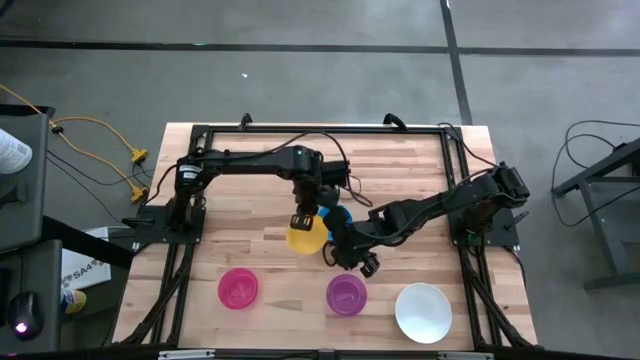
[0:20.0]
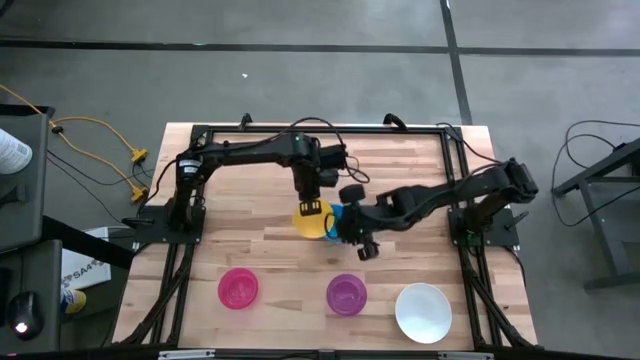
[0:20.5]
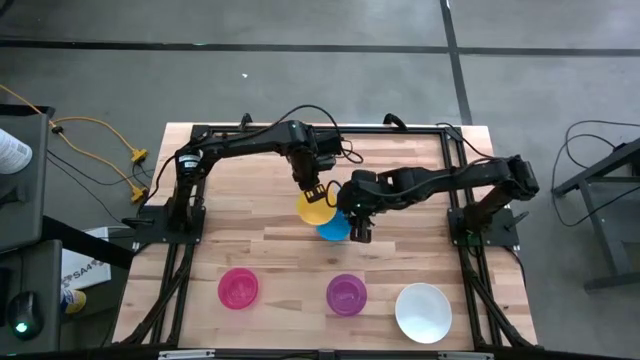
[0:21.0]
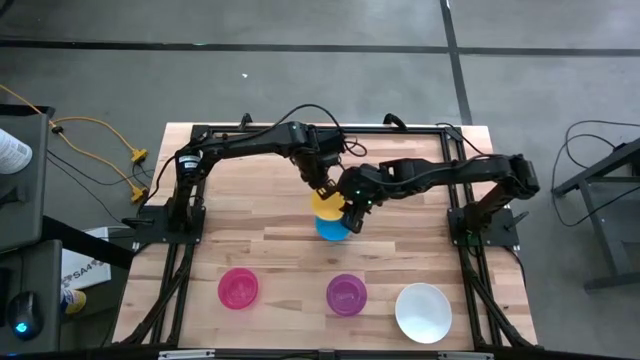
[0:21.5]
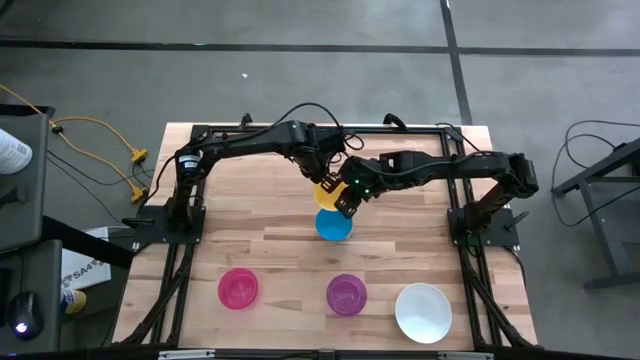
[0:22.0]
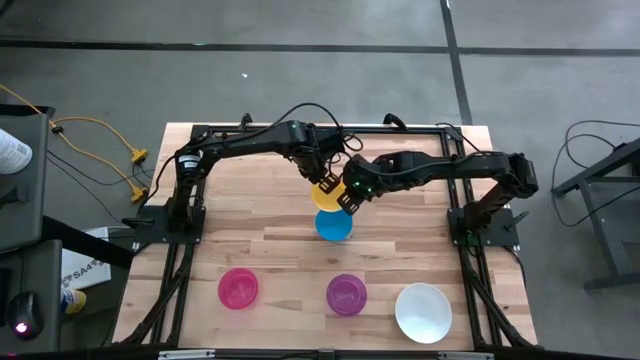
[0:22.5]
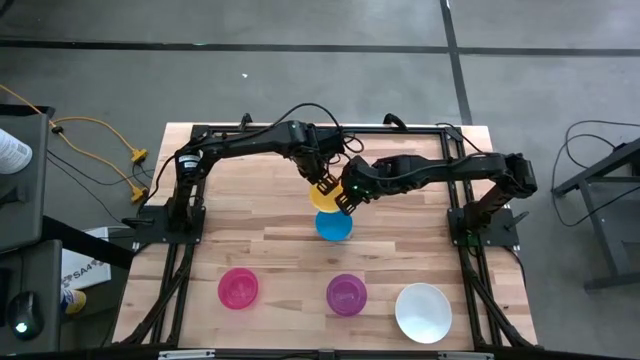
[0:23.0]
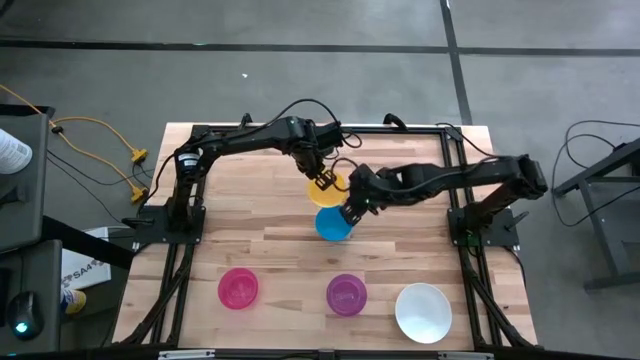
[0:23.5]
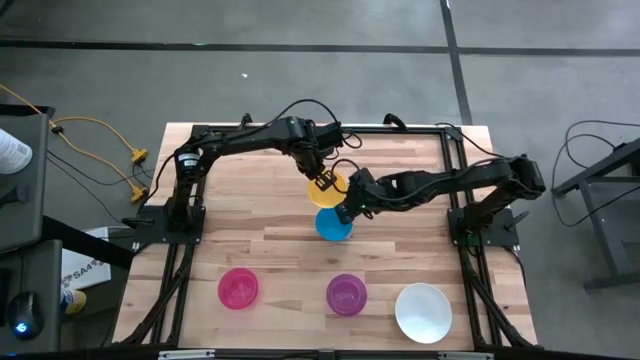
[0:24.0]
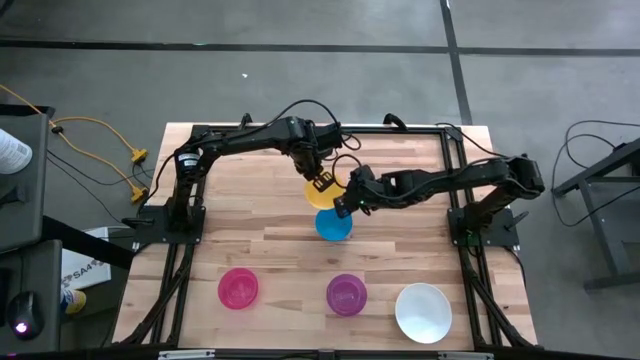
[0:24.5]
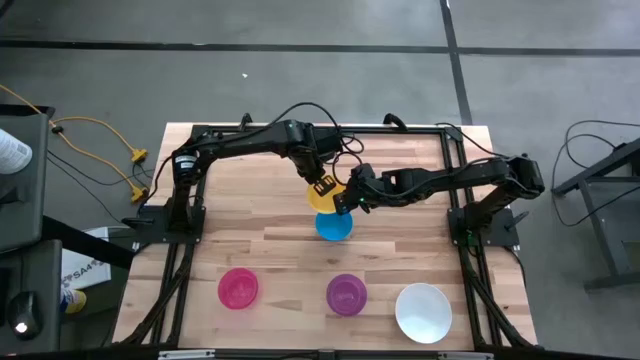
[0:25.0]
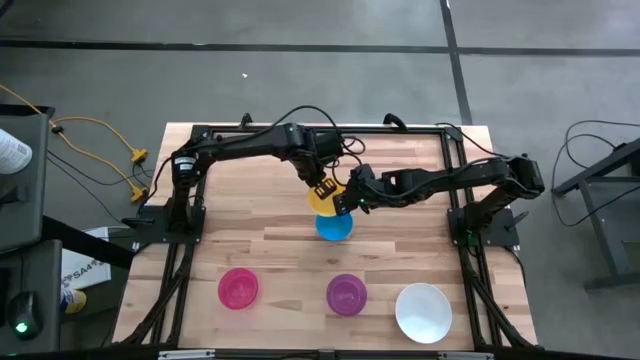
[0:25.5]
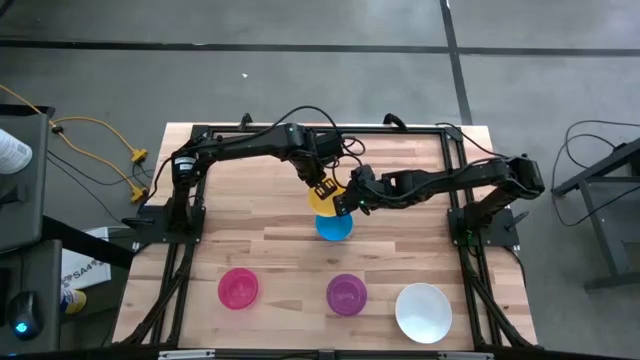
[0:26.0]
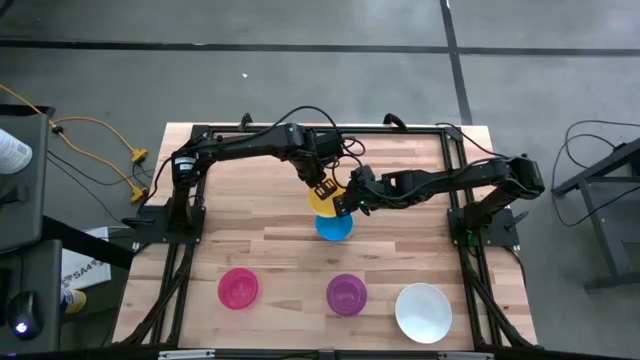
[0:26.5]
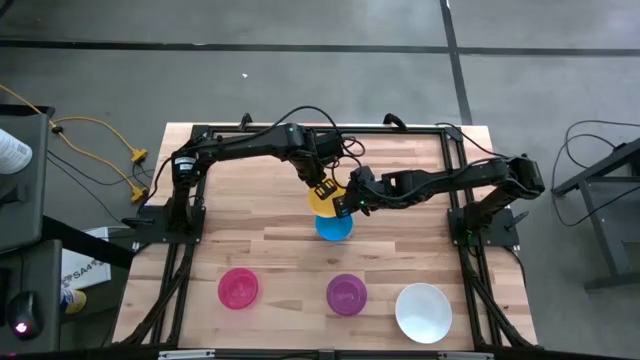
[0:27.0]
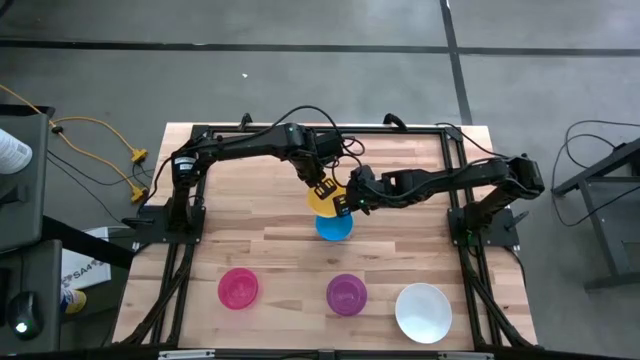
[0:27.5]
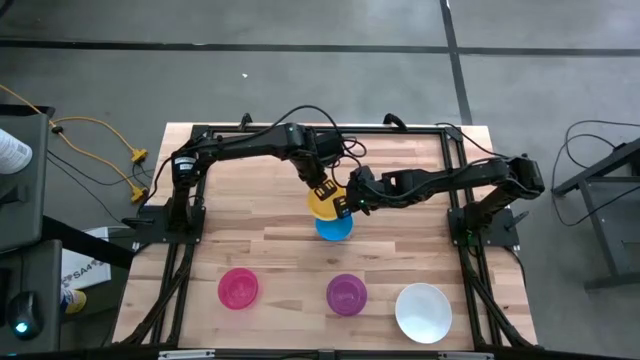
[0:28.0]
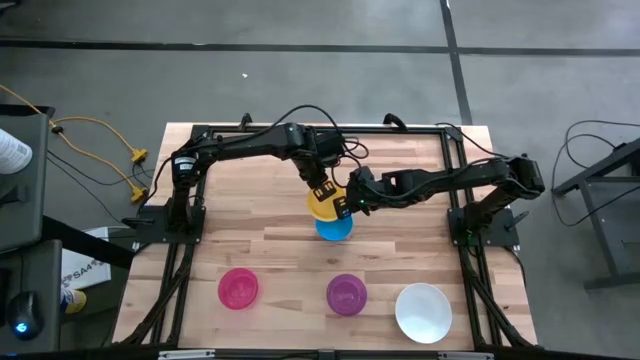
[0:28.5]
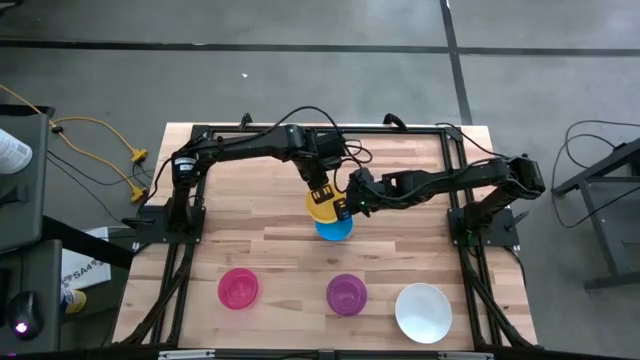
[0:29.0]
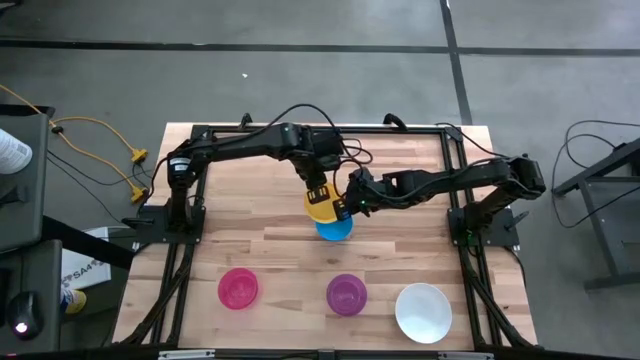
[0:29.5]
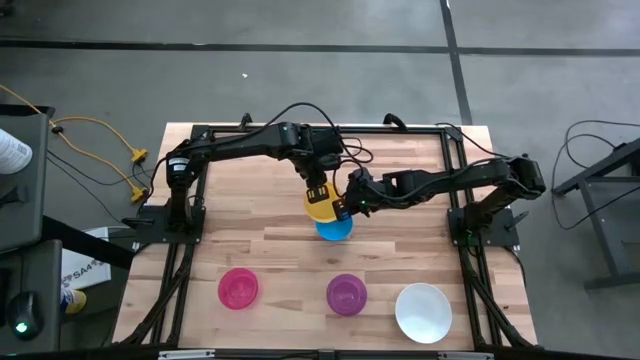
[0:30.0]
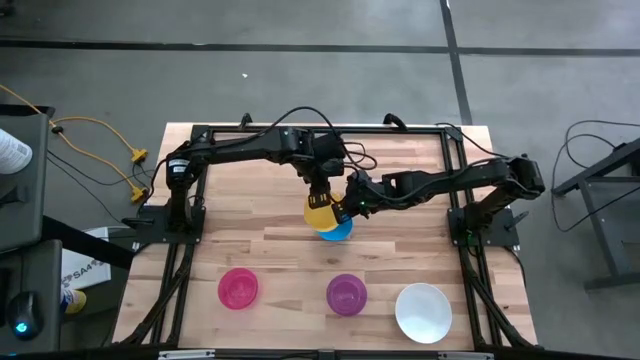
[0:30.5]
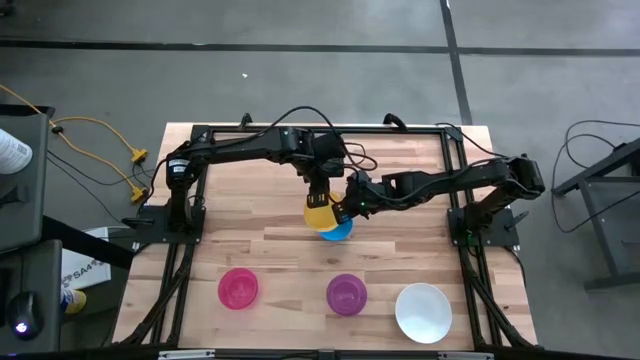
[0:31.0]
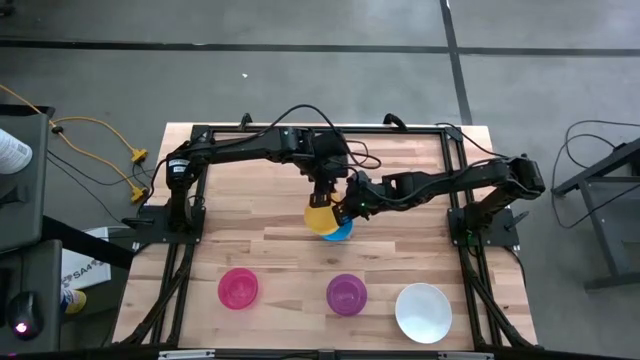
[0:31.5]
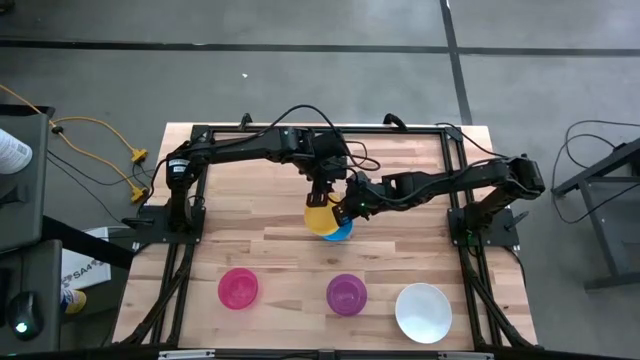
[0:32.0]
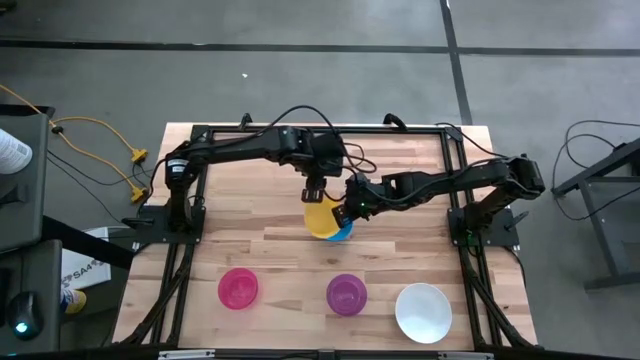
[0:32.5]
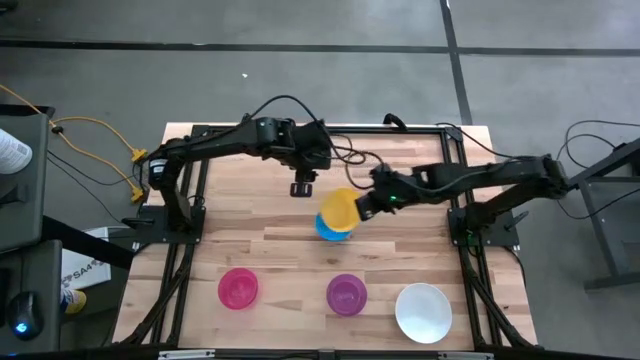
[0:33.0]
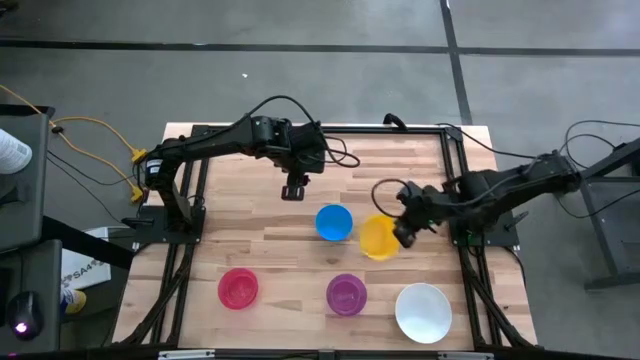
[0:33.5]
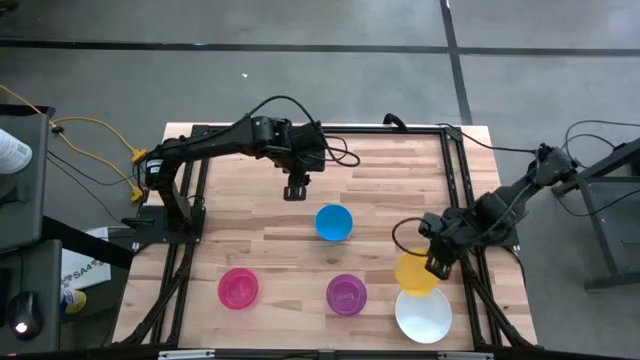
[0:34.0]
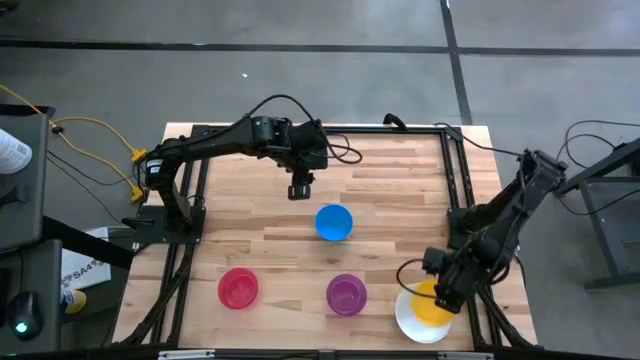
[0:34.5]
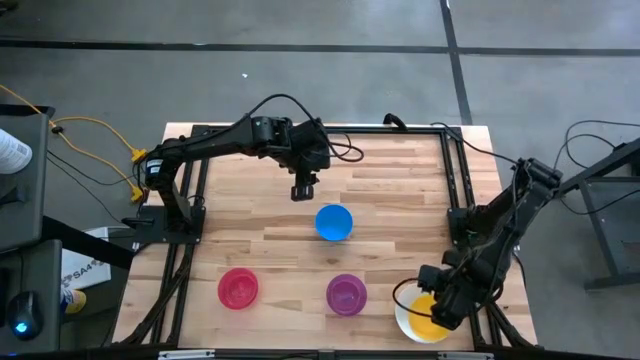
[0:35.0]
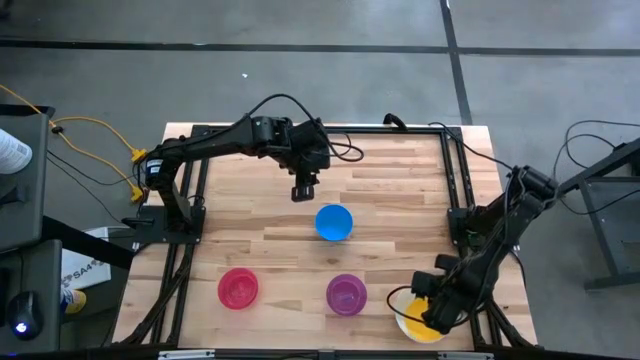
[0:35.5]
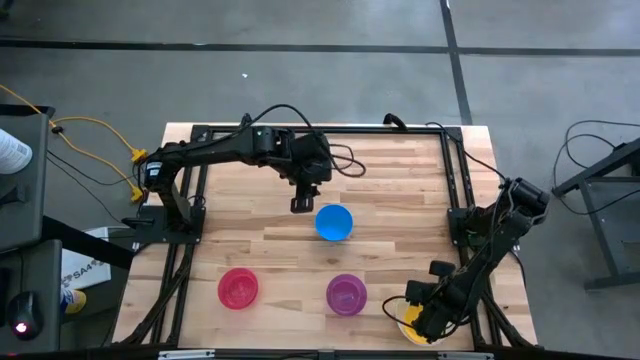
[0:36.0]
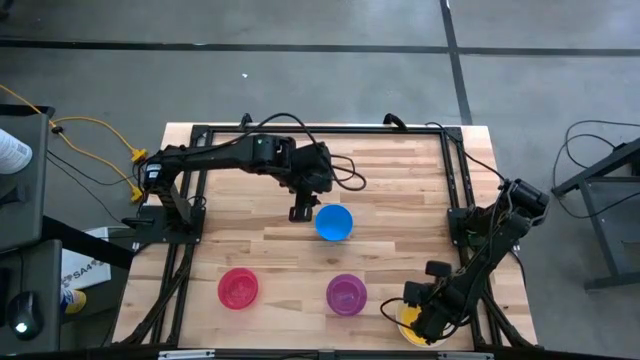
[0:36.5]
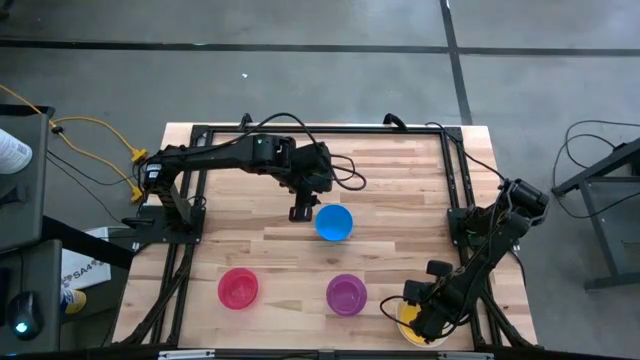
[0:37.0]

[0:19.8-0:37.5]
Stack the yellow bowl on the white bowl
